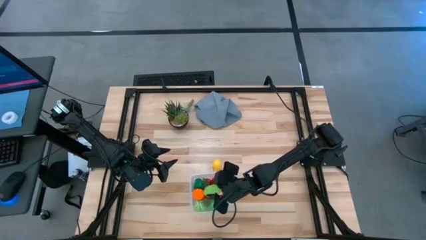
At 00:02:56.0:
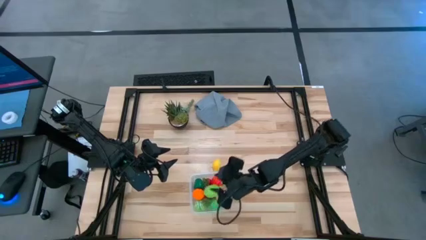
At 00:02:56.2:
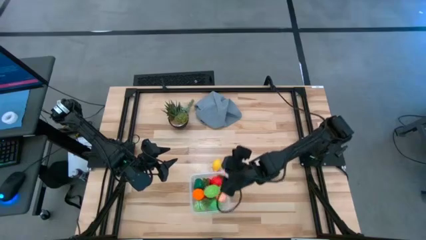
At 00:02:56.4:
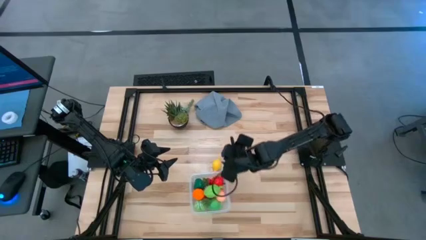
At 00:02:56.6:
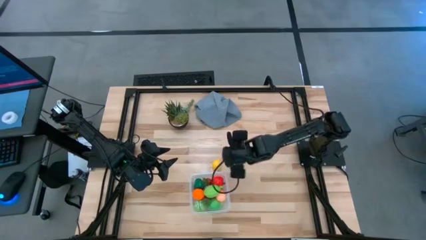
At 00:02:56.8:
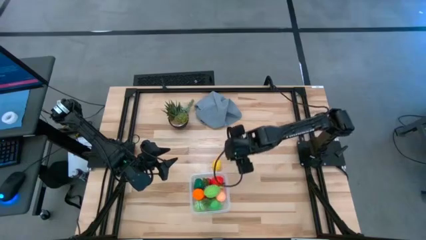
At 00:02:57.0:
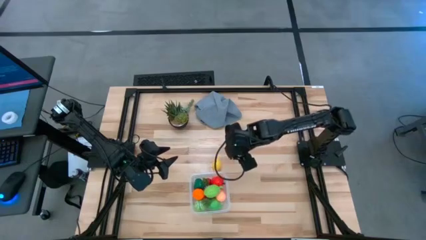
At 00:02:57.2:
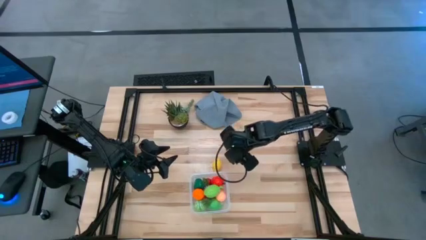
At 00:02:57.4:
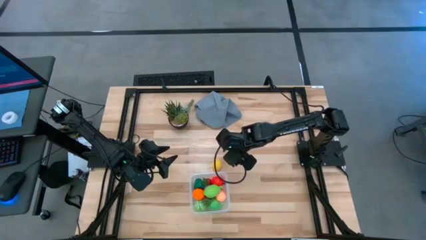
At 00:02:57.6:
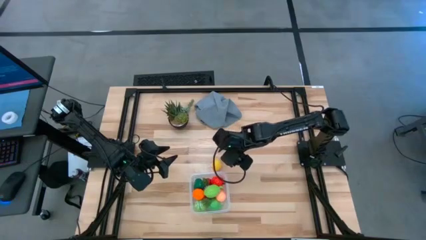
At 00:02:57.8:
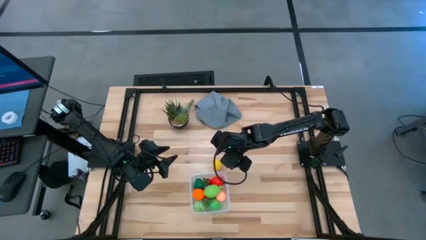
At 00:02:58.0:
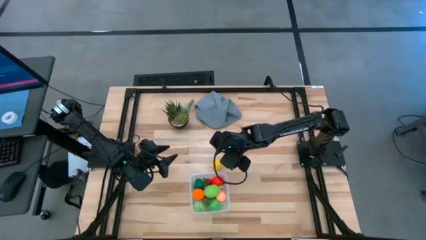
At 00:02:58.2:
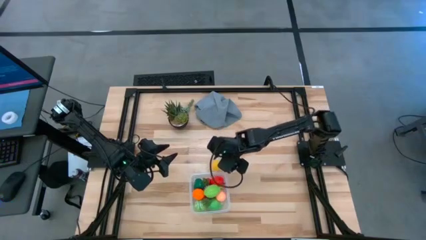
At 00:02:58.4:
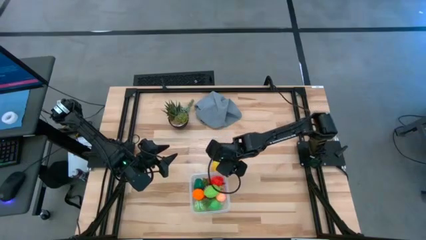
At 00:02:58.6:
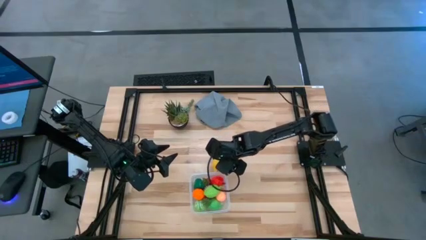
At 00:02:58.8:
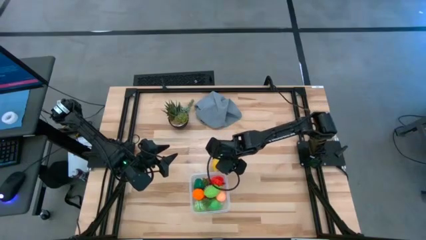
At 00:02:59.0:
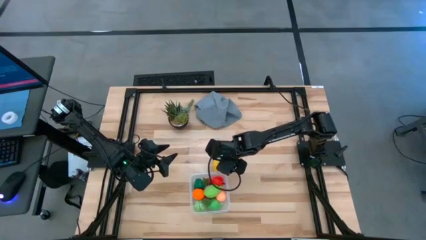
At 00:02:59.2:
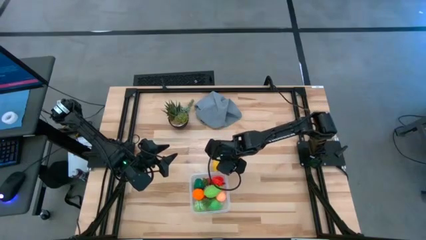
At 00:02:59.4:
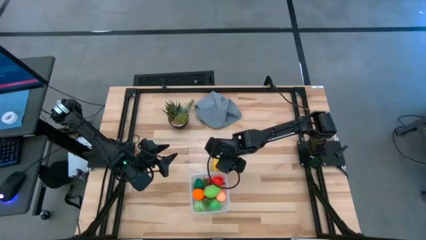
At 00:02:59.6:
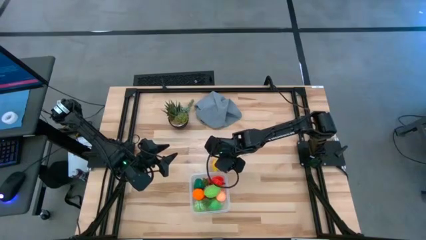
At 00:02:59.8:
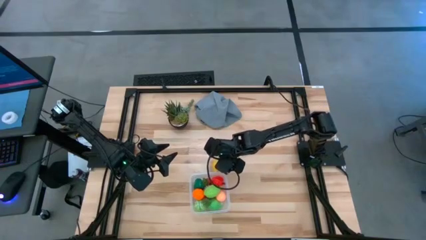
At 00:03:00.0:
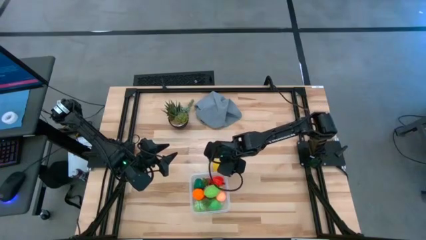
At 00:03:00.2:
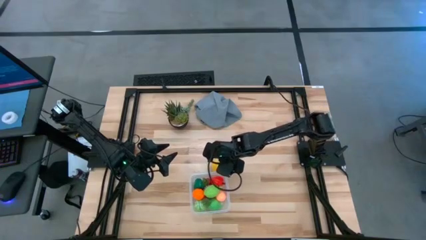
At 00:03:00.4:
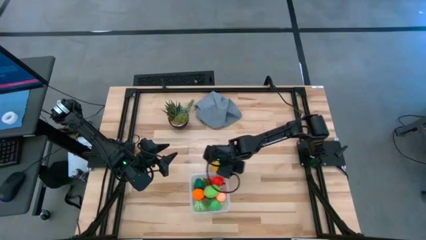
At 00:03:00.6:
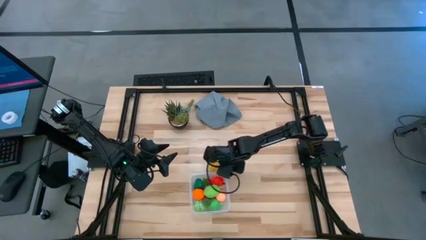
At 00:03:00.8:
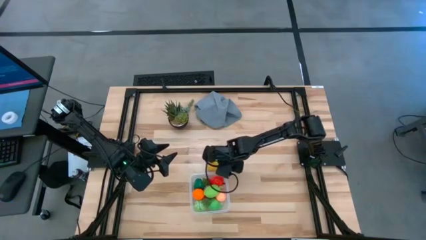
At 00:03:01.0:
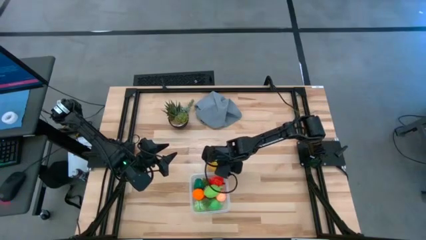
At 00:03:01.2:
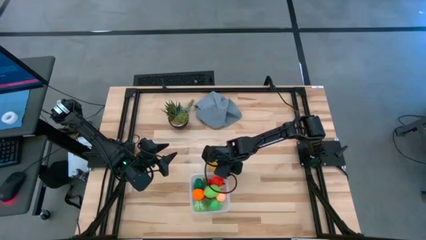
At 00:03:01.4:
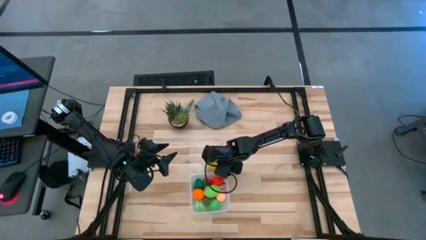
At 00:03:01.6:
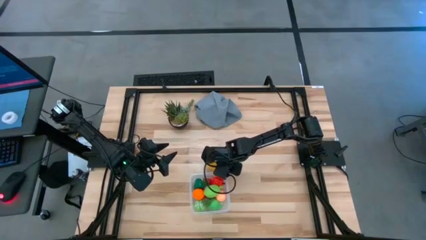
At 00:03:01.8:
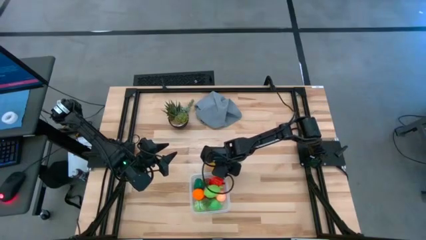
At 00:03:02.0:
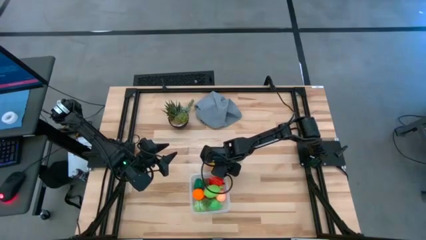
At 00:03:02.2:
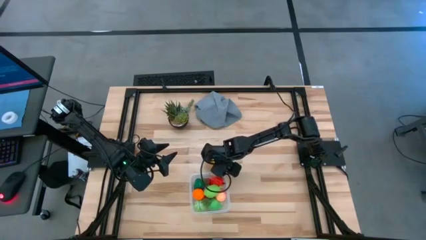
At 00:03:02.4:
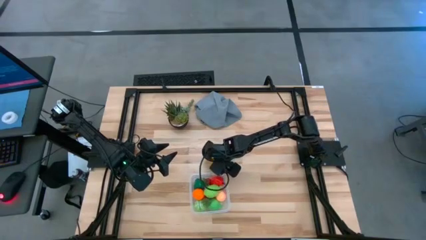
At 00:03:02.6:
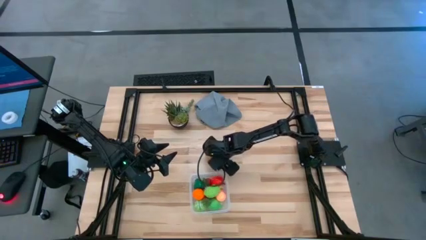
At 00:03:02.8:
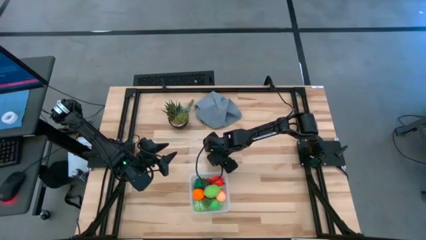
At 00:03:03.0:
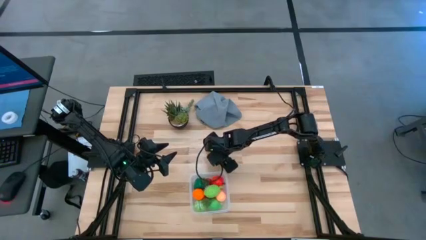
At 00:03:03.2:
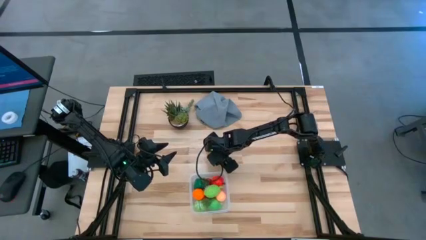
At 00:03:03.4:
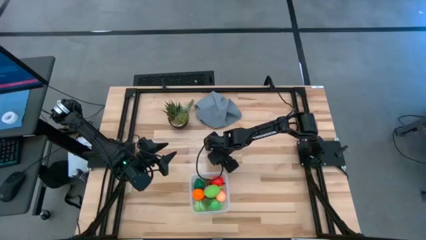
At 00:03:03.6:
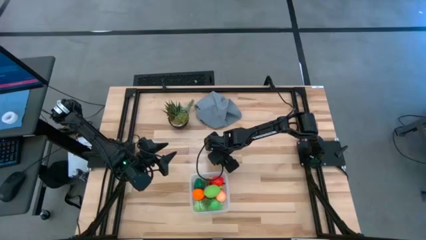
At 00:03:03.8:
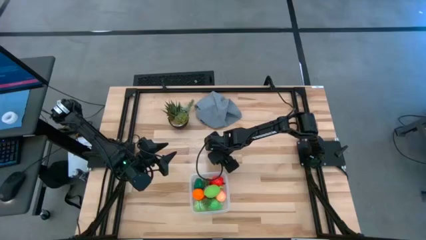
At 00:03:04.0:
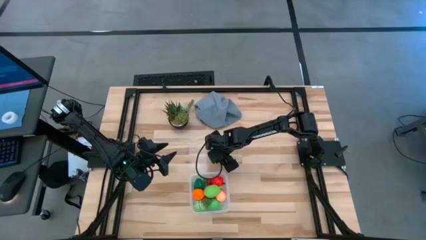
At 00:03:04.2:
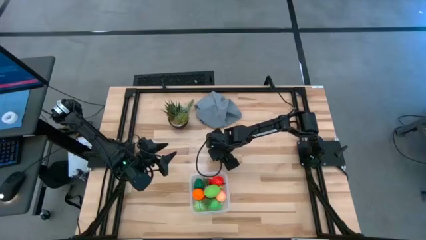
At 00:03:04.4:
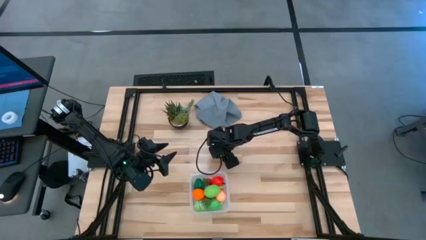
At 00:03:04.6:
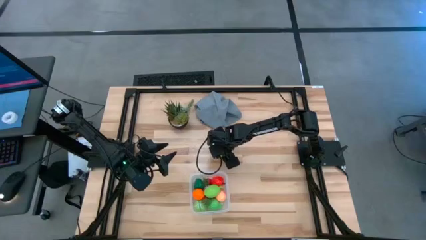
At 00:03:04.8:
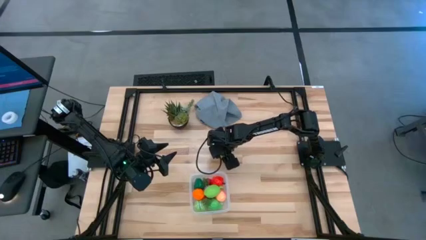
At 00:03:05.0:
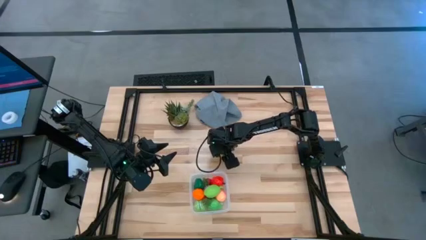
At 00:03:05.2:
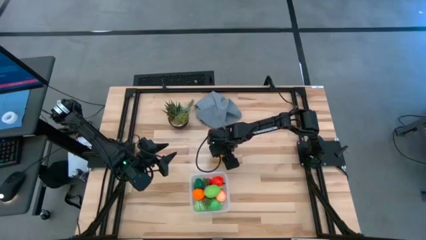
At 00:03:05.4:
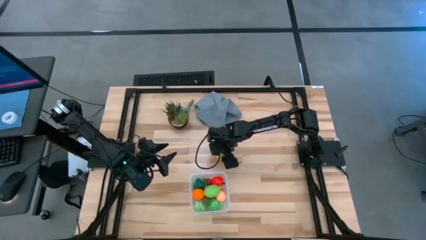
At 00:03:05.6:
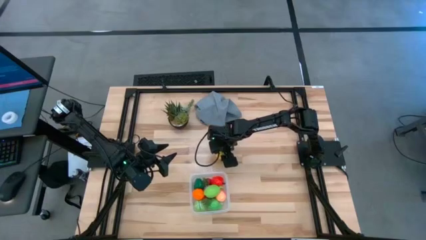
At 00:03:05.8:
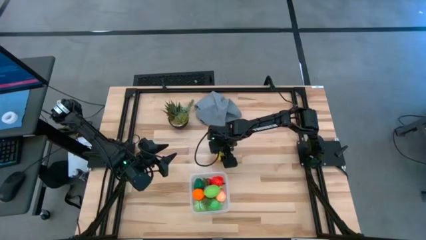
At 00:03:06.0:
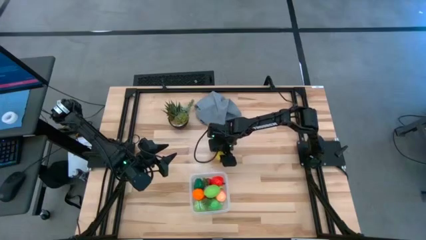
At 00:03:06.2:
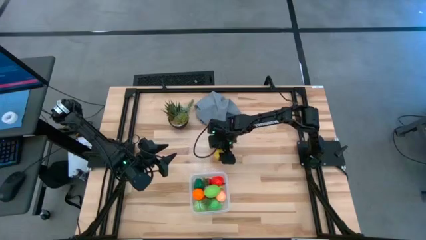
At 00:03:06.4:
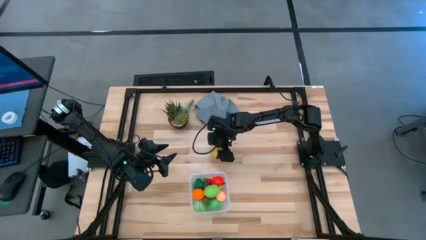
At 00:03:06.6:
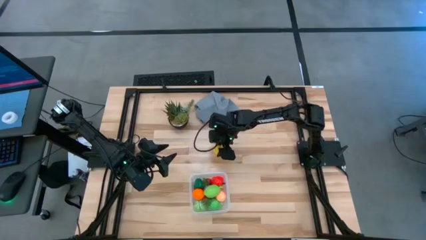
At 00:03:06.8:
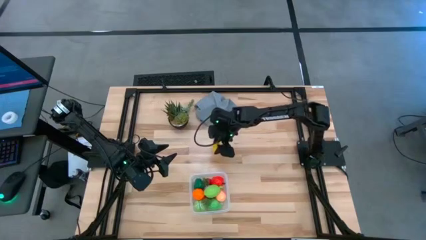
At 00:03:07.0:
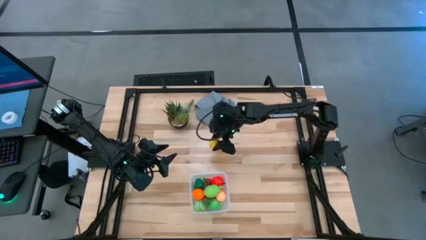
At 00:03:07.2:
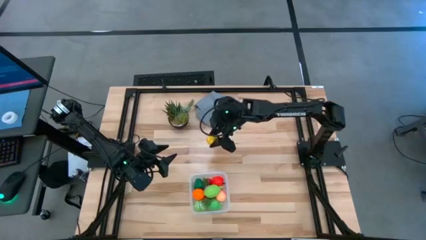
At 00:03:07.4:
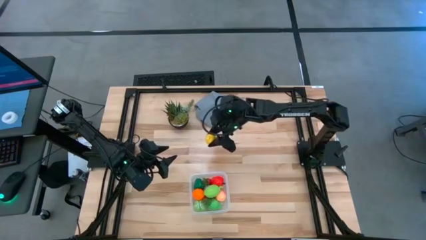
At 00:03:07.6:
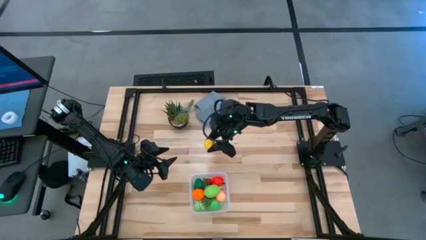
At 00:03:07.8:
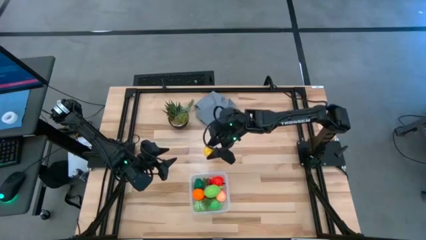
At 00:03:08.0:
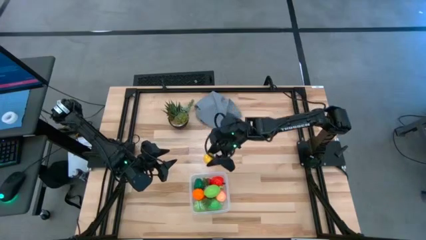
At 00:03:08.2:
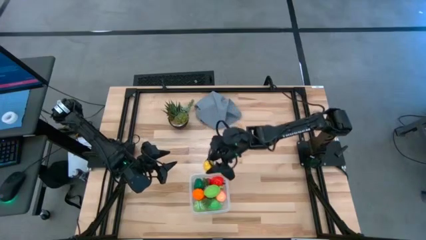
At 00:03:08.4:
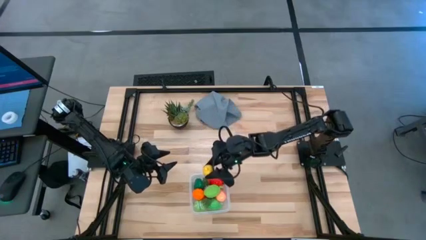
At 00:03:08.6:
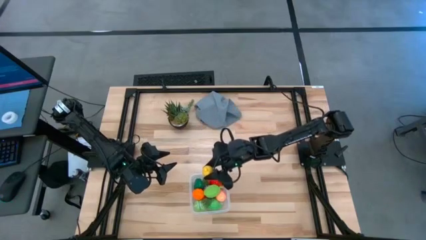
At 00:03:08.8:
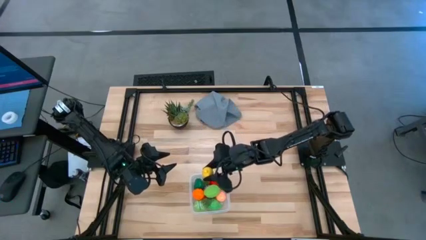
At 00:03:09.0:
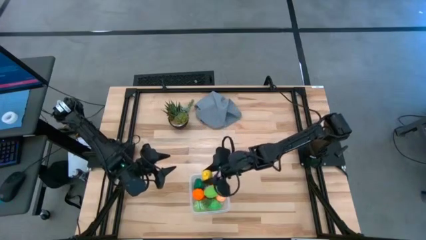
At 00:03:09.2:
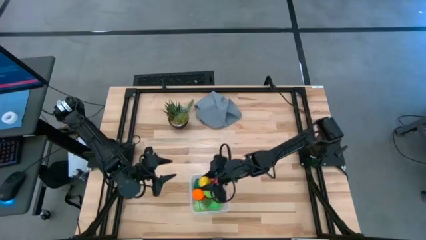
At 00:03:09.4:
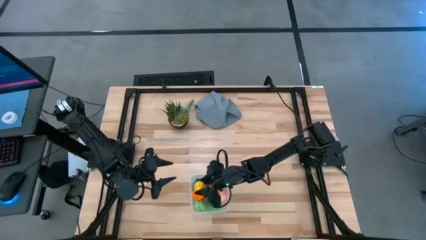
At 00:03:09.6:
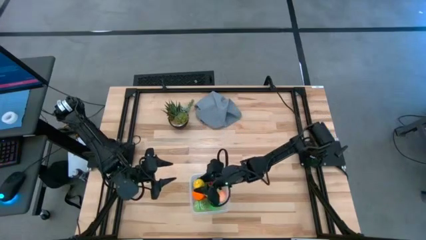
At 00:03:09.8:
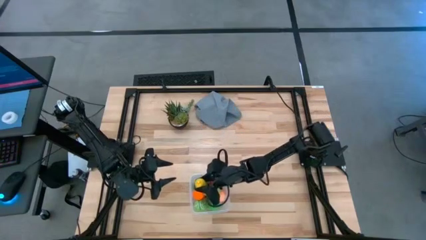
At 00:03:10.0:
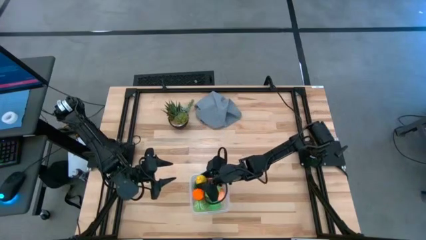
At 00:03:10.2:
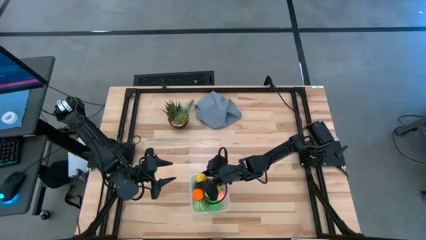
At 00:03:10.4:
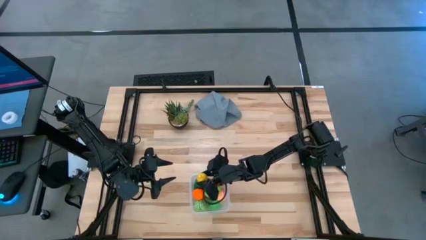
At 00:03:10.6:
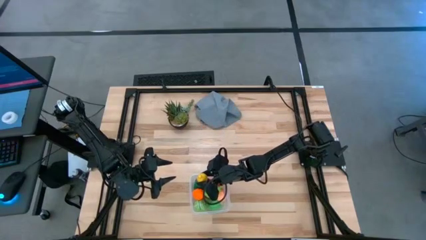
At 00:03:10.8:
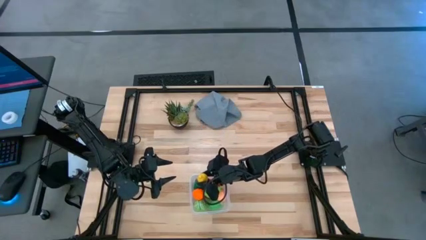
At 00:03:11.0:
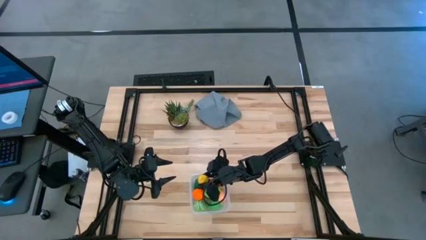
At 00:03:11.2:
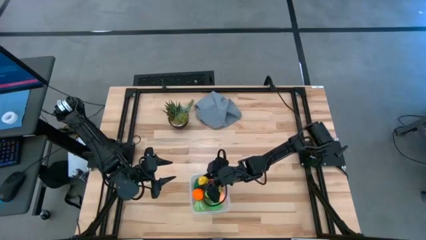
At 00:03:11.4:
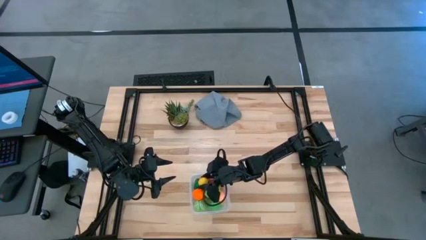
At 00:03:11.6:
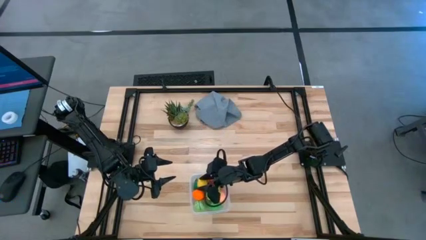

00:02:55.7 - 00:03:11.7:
Task: Pick and placing Produce into tupperware
Put the lemon into the transparent bin
